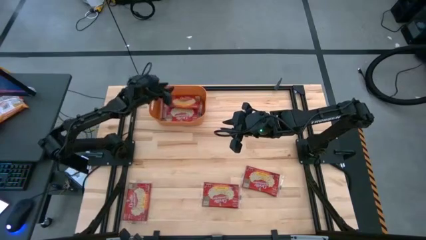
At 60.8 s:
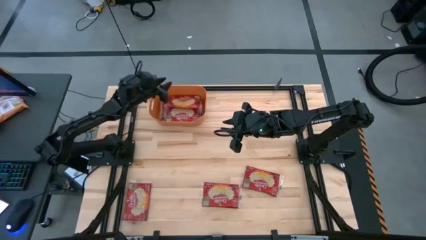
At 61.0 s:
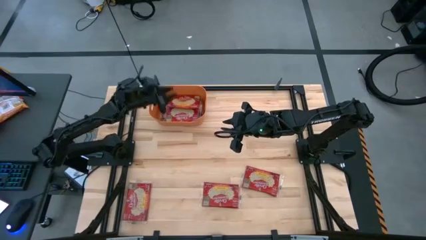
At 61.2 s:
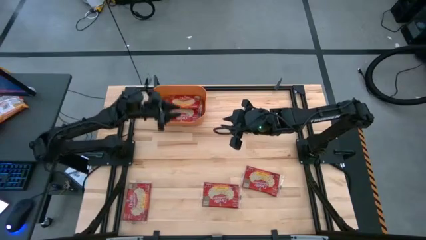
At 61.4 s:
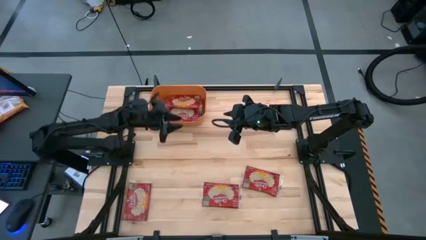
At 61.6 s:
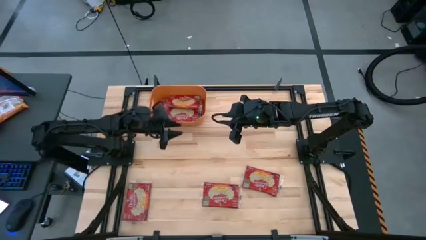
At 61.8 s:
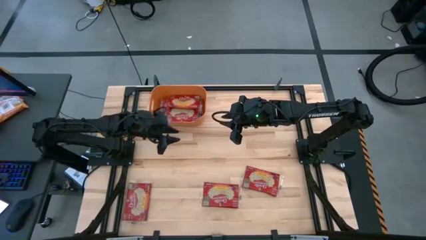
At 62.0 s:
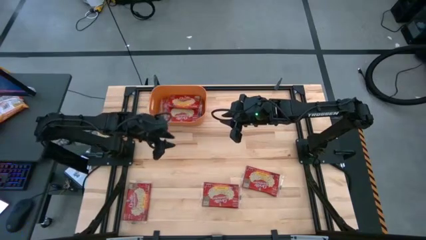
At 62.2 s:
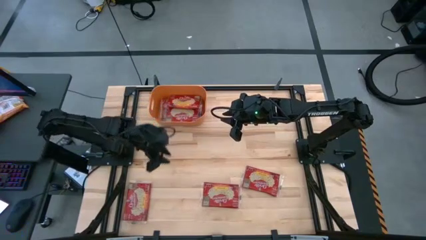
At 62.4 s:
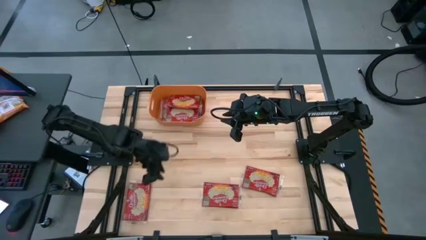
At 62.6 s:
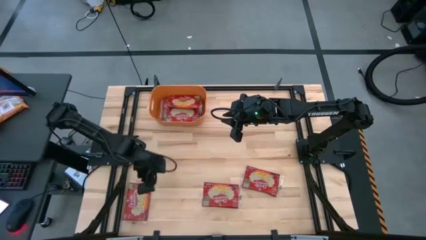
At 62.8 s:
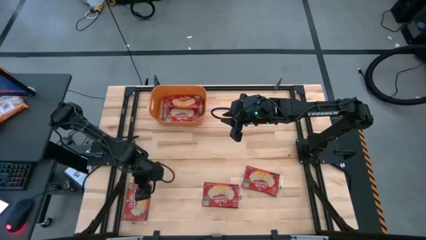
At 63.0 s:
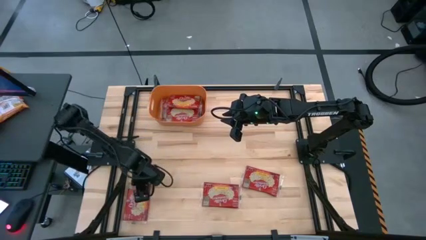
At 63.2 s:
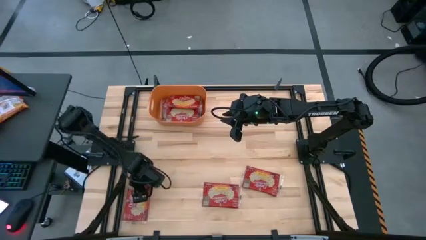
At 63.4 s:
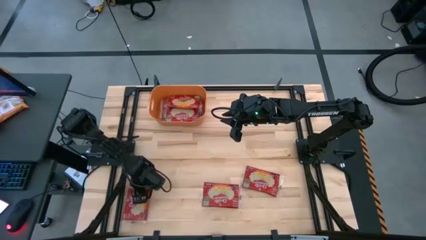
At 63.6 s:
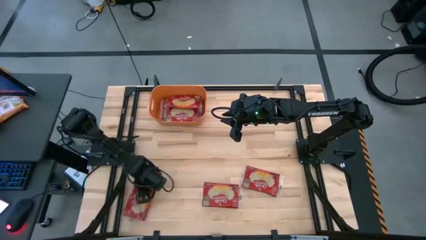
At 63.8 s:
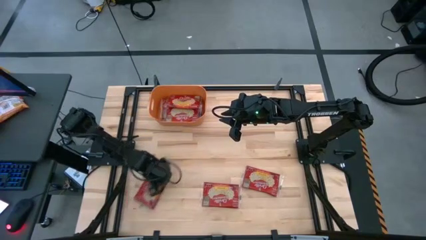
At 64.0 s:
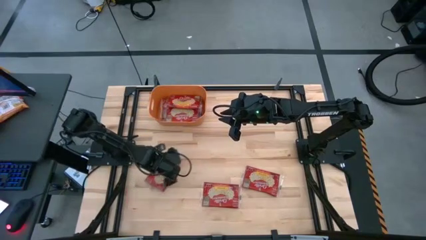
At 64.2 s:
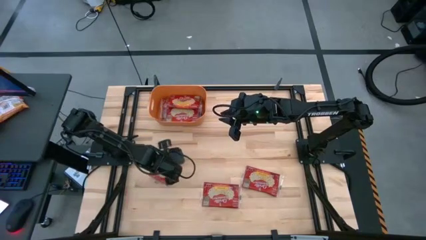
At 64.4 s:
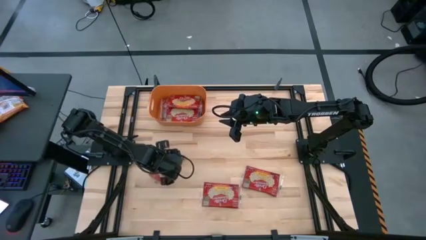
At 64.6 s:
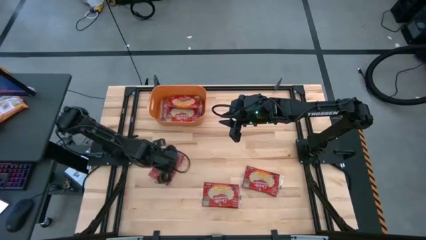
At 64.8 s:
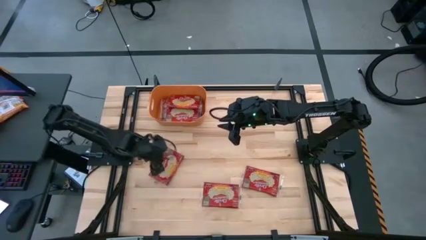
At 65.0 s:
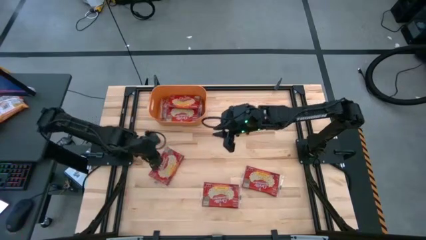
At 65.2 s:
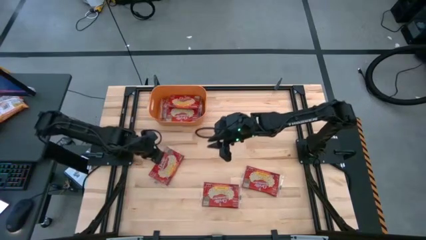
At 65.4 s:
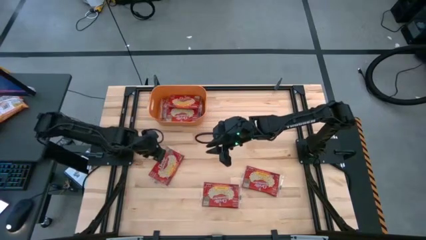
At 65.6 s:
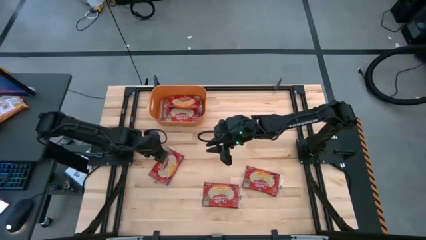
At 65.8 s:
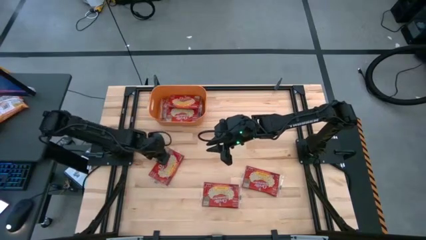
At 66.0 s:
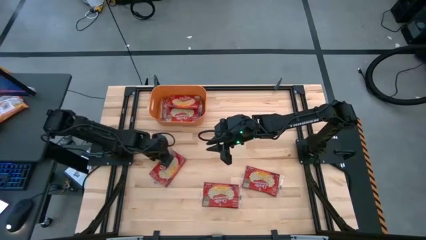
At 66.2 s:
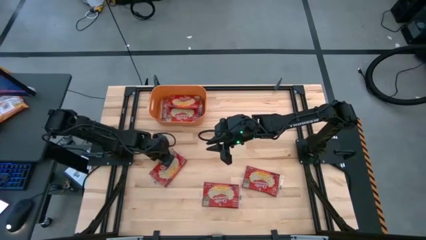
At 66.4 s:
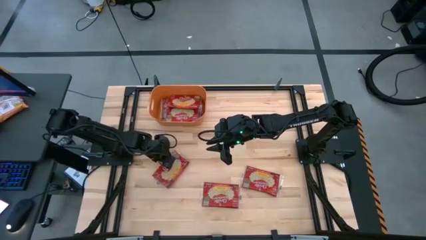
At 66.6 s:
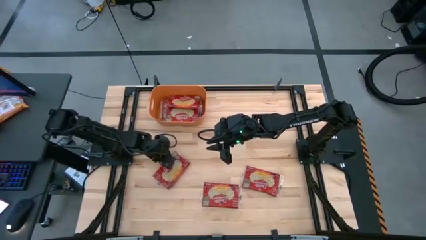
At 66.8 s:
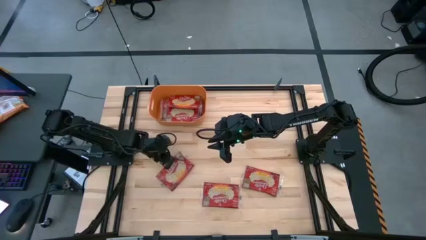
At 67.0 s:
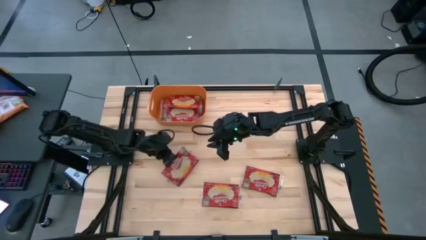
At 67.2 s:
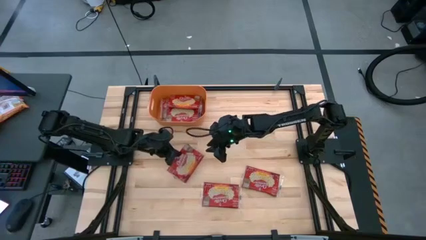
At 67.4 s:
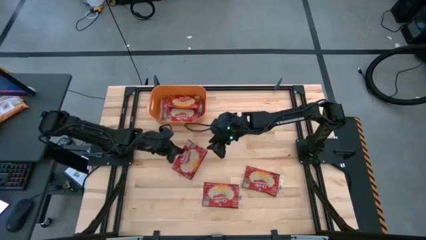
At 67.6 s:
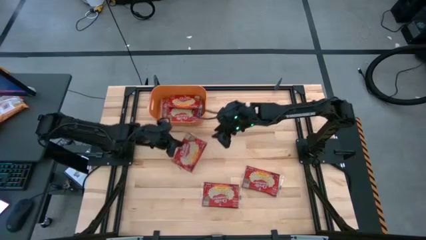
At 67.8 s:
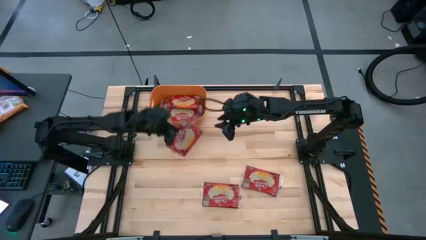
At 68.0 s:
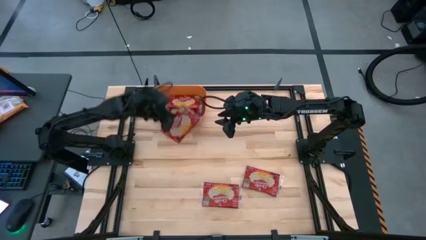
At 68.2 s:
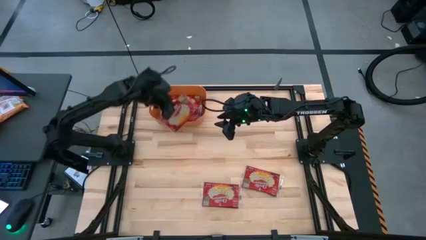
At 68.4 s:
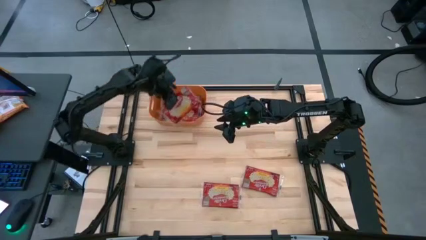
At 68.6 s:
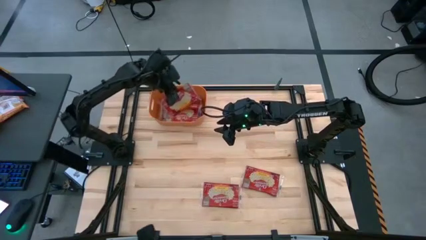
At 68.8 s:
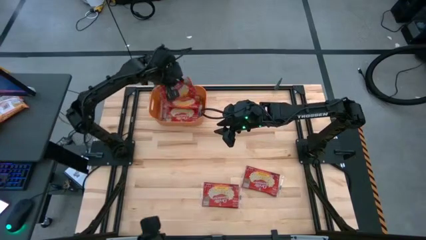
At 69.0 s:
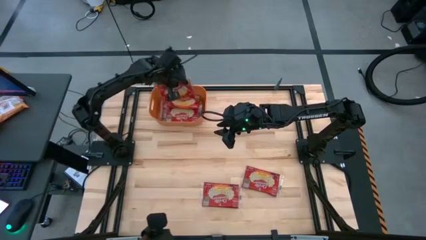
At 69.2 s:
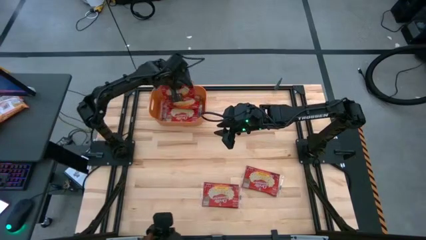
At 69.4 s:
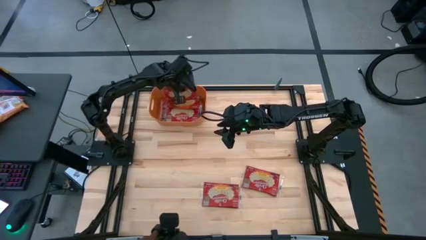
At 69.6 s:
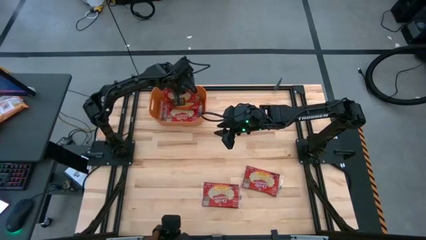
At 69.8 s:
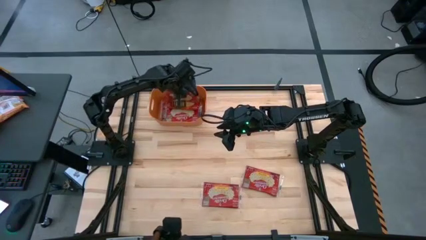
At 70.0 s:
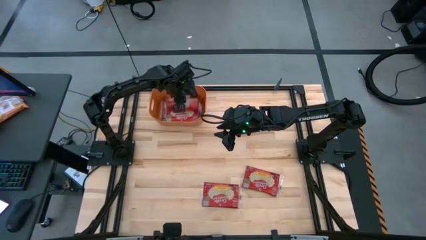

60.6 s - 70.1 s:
Task: Sort popcorn bags into baskets
Put the red popcorn bag into the orange bin

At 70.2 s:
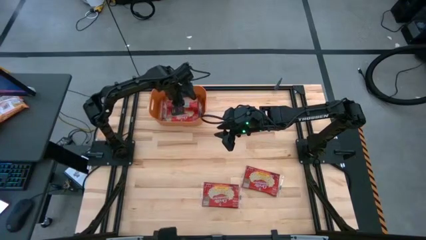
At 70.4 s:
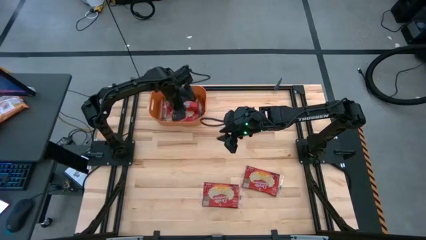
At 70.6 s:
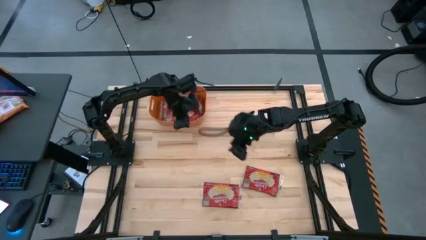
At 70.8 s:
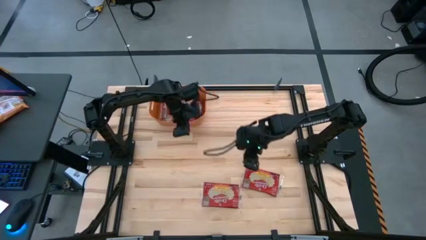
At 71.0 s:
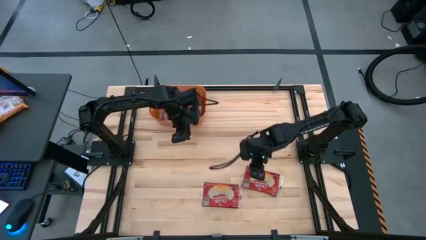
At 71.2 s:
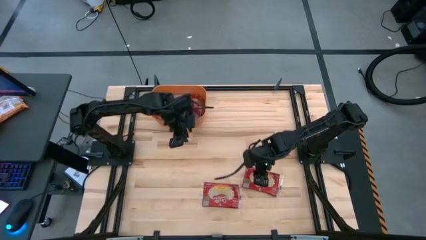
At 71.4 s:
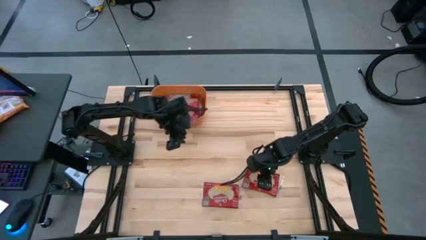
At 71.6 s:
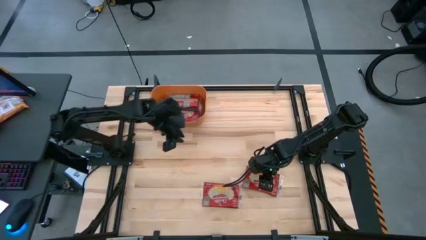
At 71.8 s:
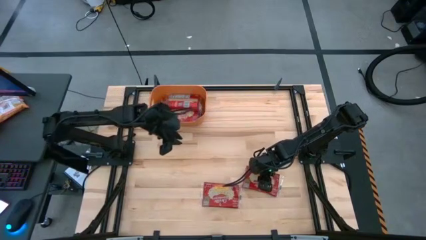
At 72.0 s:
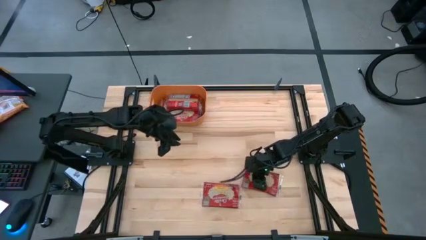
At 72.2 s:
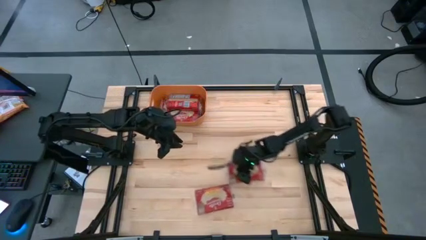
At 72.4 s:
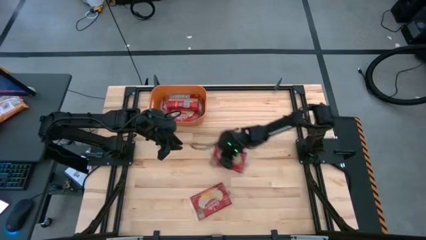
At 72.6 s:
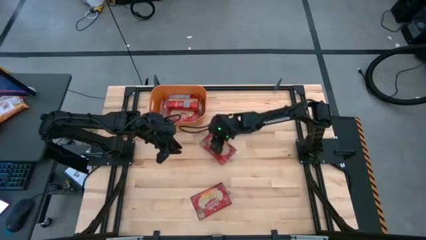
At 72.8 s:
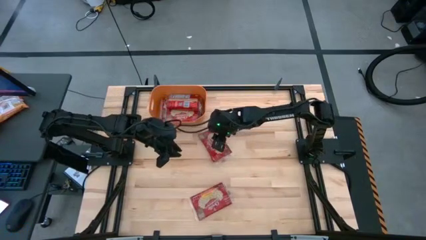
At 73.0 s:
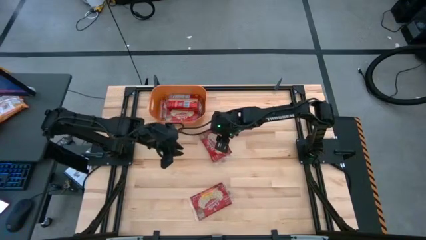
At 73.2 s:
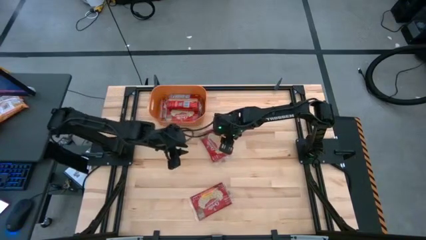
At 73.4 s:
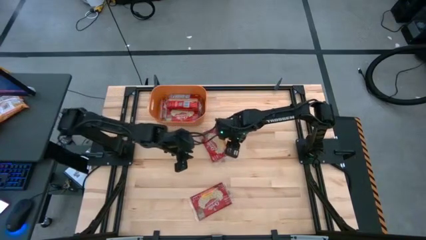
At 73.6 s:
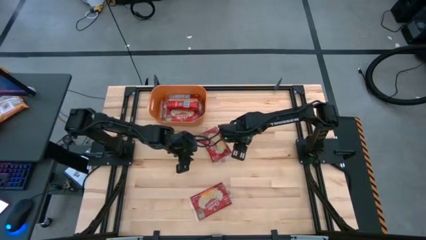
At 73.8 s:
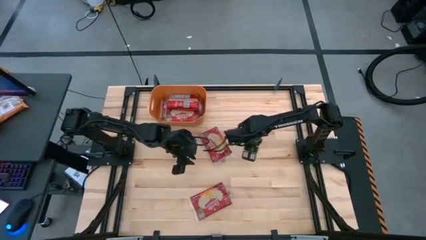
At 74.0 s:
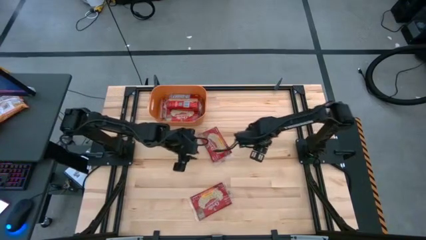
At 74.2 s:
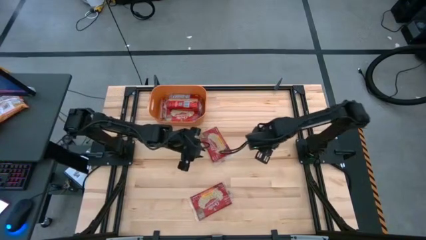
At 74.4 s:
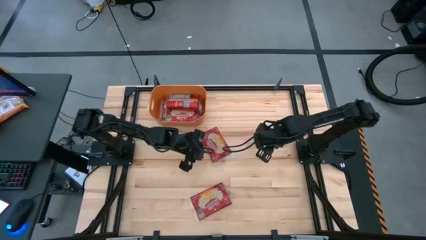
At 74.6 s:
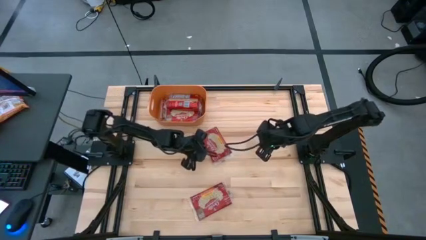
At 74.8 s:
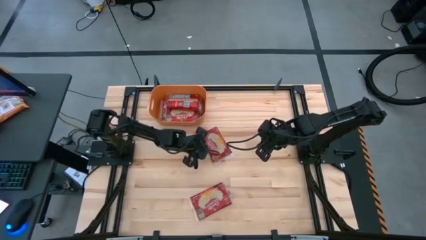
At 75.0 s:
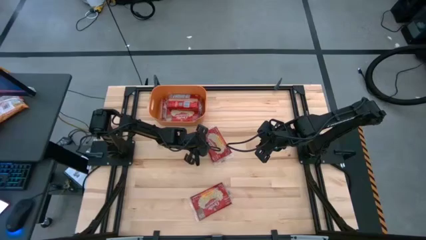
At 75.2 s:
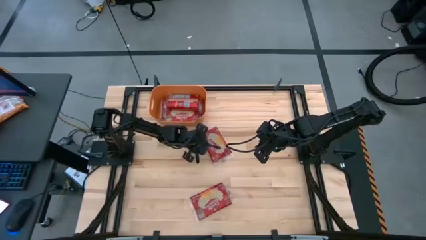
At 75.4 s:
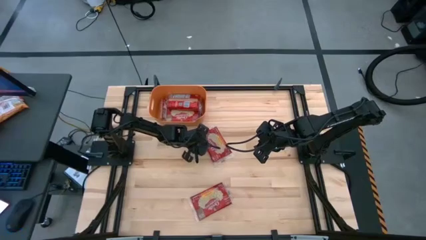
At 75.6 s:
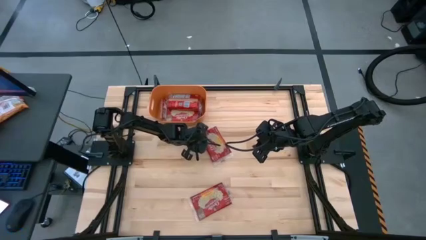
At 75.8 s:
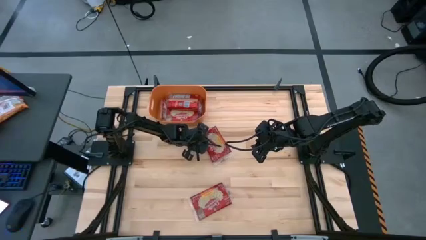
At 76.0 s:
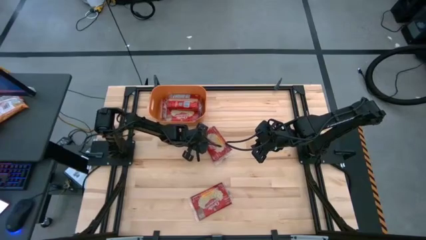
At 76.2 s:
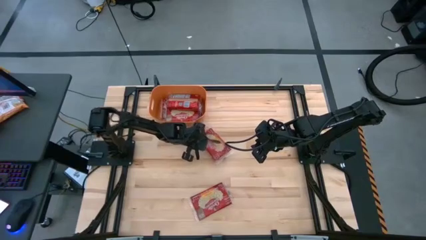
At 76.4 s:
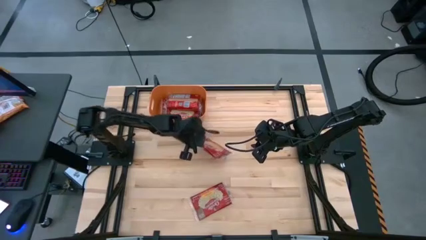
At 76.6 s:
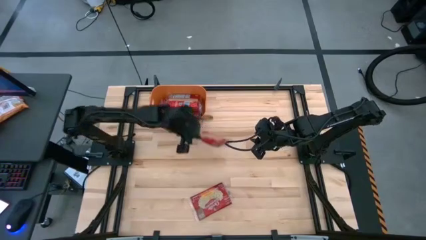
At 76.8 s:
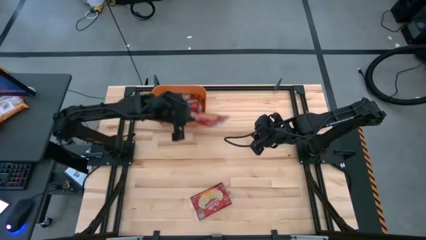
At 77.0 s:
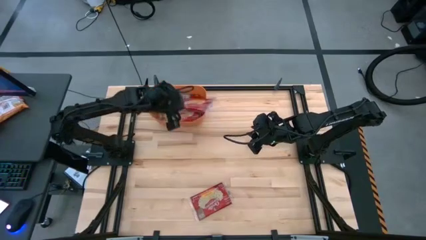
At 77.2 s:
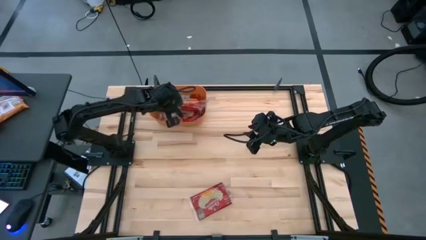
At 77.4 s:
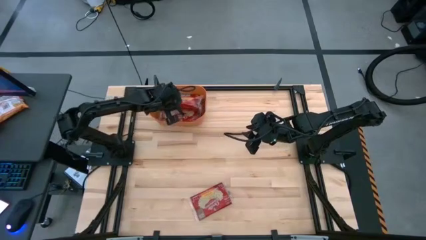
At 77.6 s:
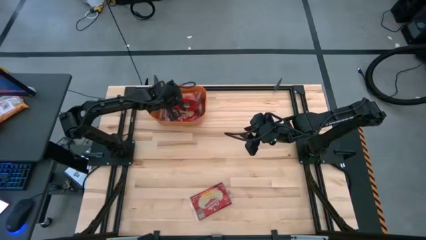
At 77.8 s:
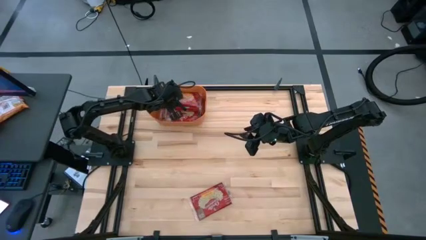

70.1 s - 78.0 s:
Put the red popcorn bag into the orange bin
